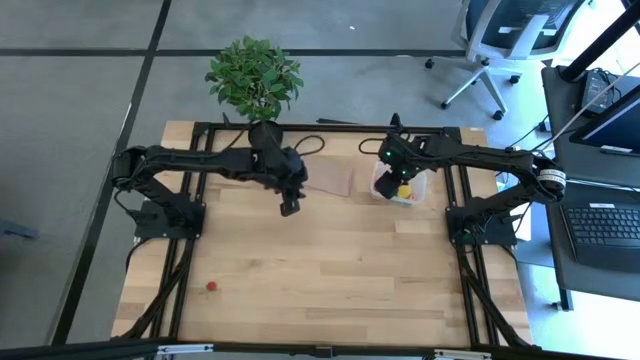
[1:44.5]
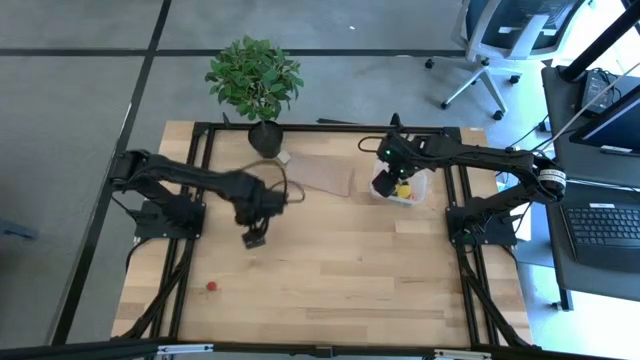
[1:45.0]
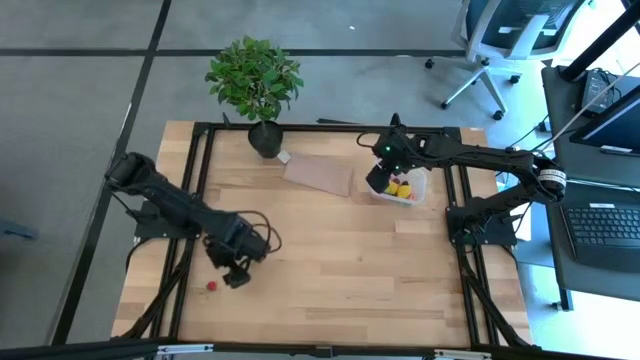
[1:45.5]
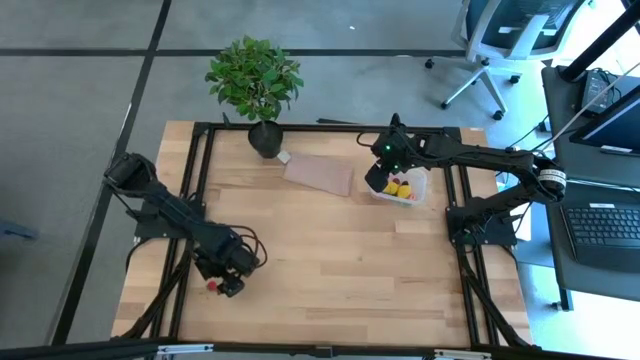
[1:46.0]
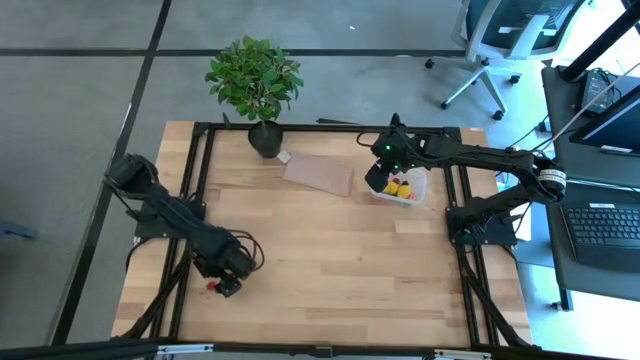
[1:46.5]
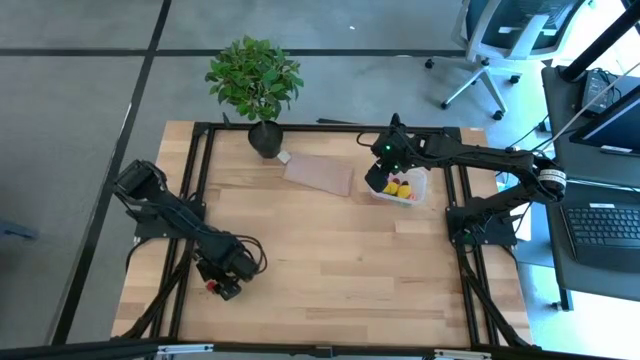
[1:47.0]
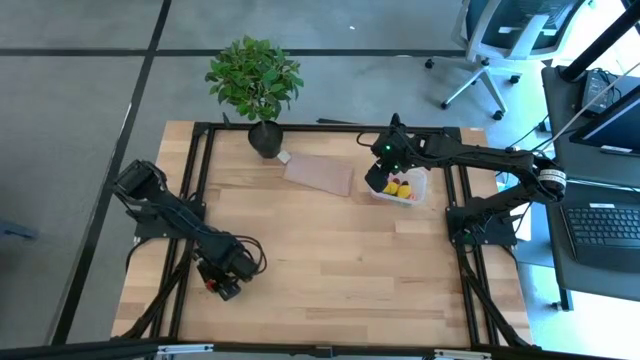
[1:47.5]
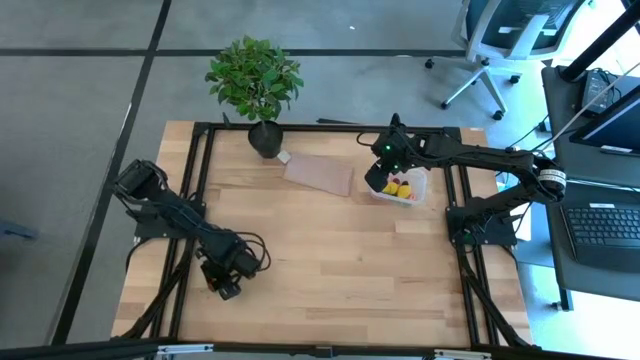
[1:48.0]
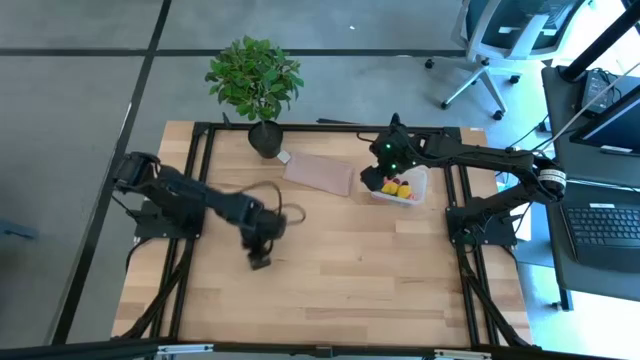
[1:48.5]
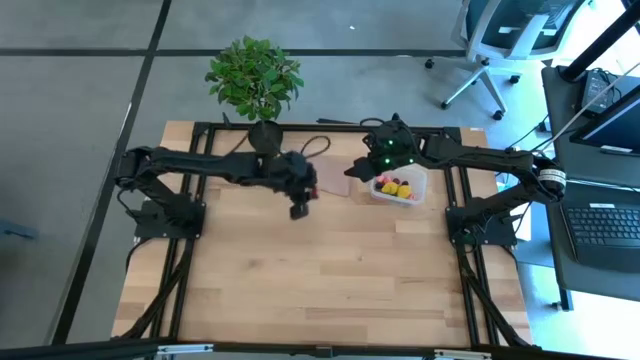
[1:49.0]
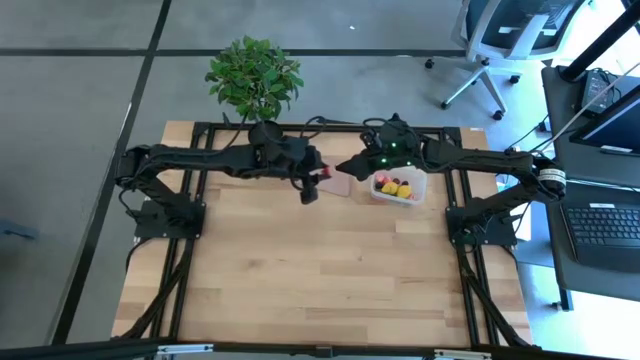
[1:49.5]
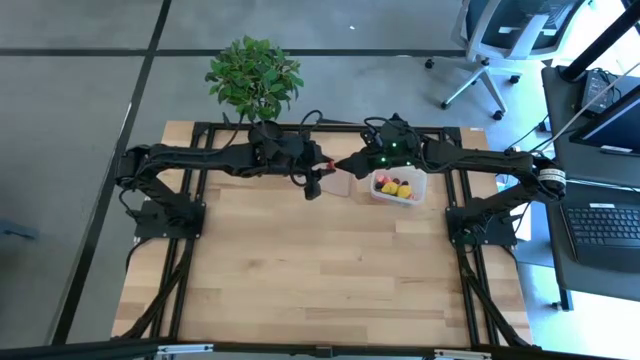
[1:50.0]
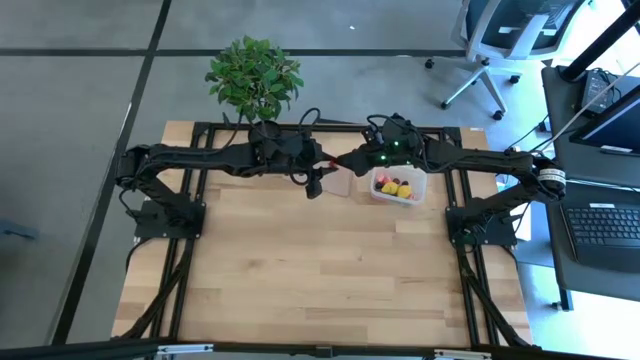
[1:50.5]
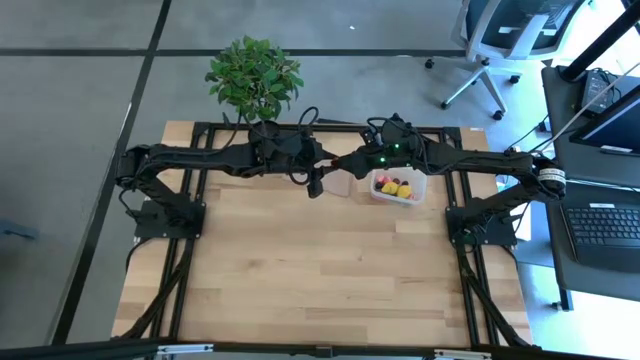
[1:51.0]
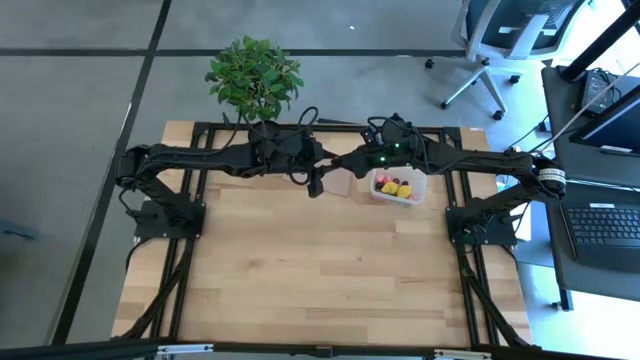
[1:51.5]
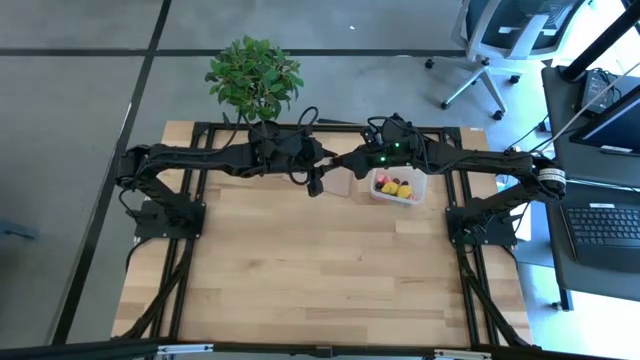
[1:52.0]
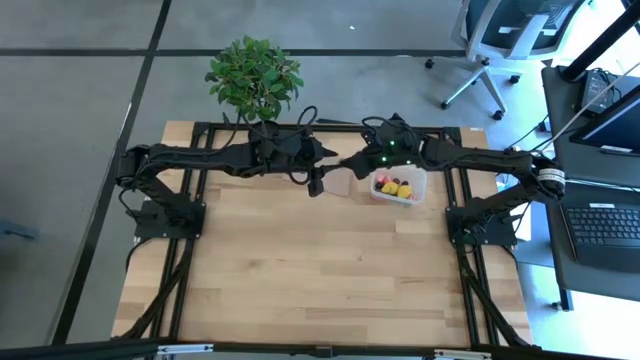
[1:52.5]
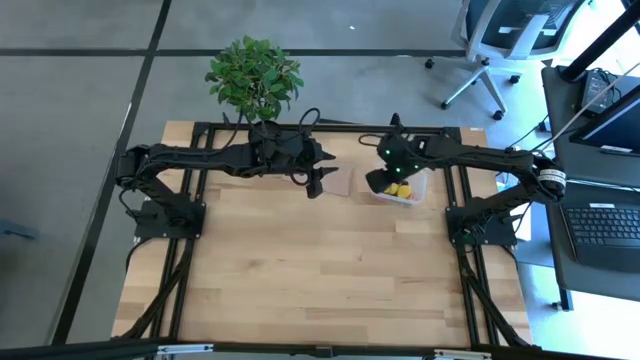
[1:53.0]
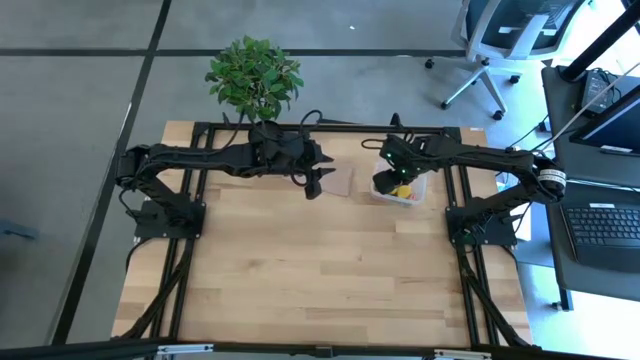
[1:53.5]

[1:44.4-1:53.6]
Task: Pick and placing Produce into tupperware
Put the red strawberry into the transparent container

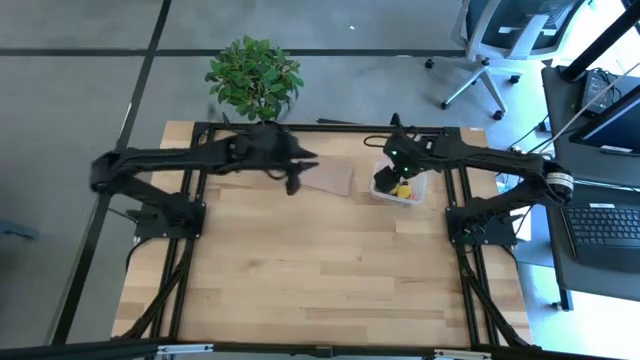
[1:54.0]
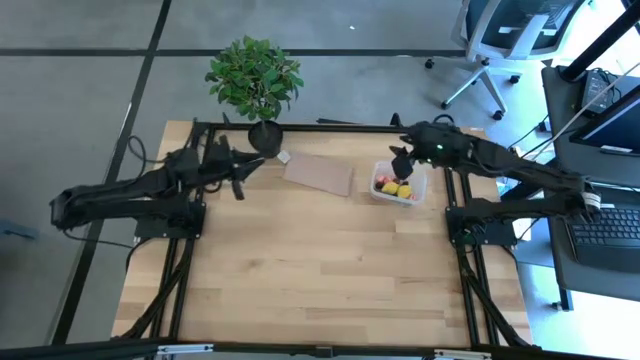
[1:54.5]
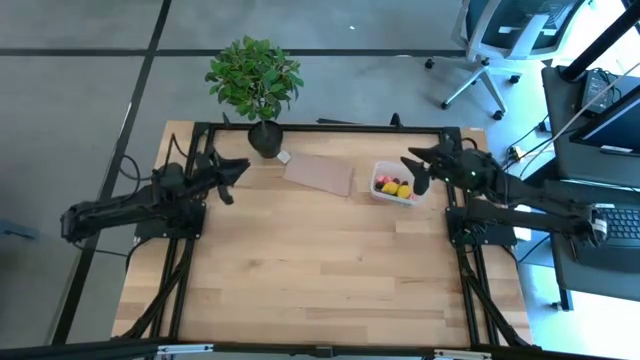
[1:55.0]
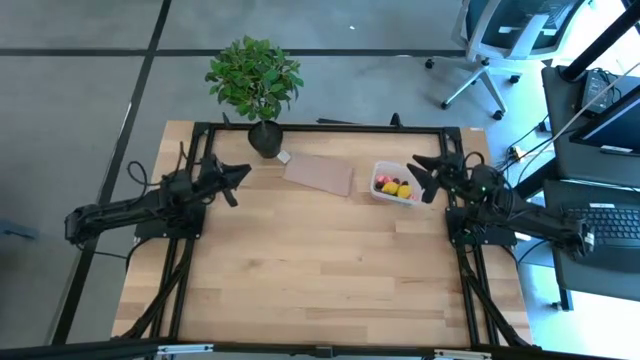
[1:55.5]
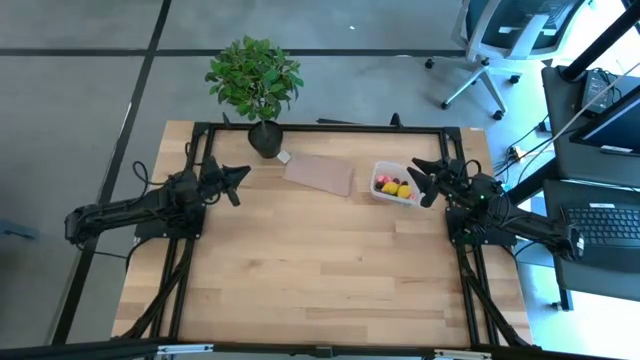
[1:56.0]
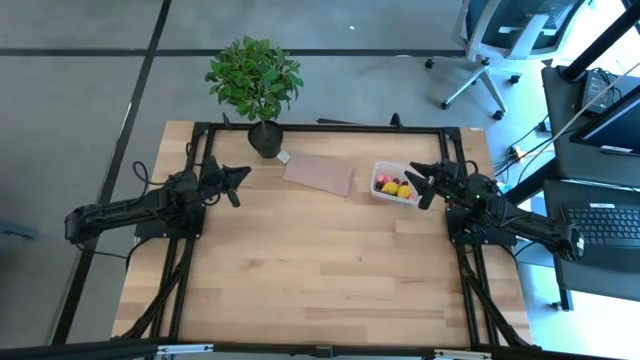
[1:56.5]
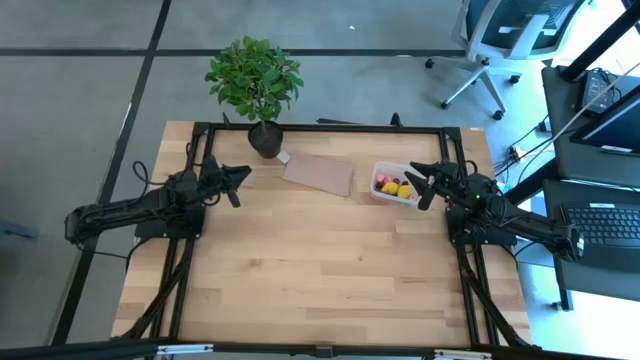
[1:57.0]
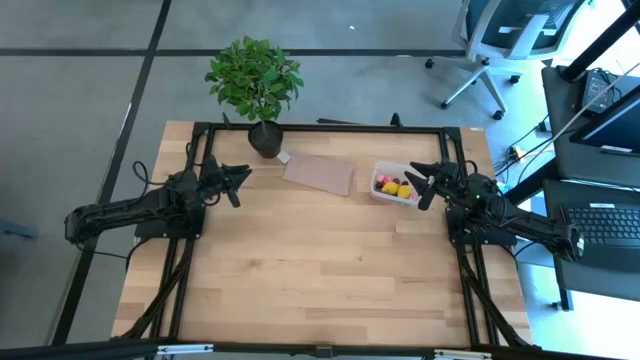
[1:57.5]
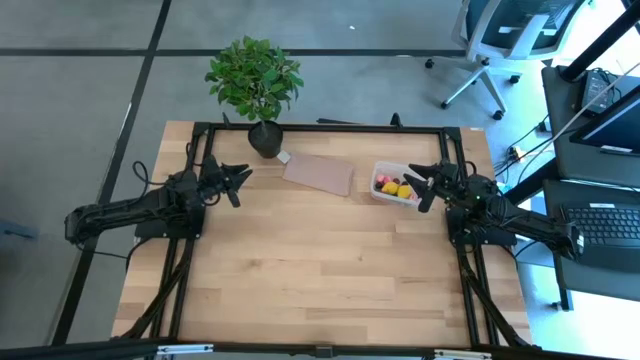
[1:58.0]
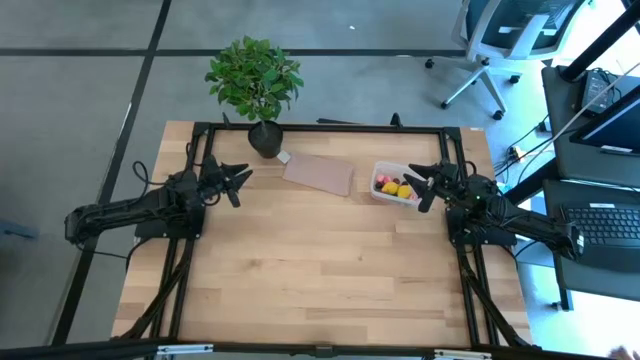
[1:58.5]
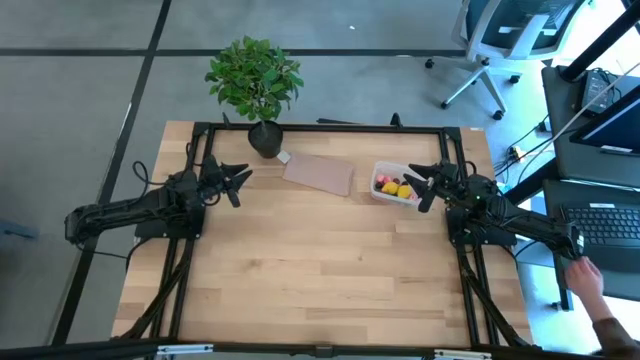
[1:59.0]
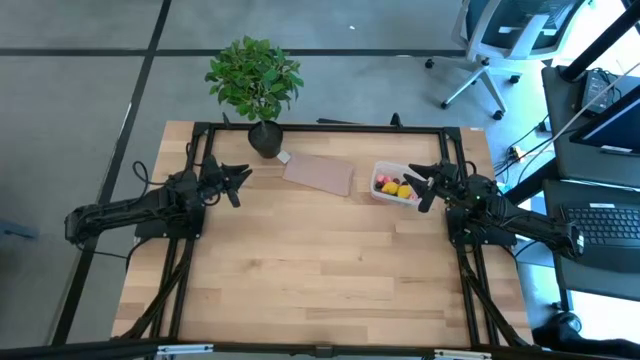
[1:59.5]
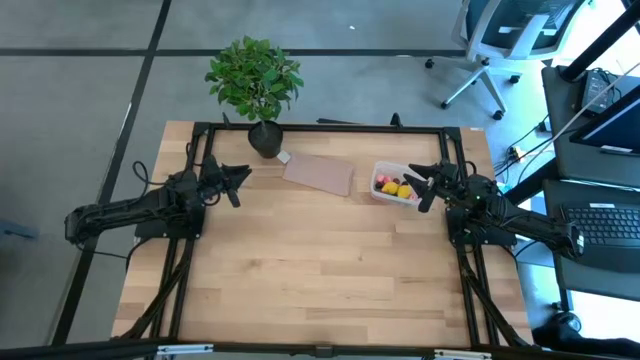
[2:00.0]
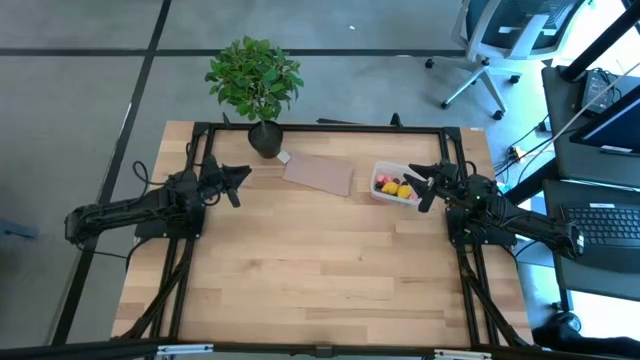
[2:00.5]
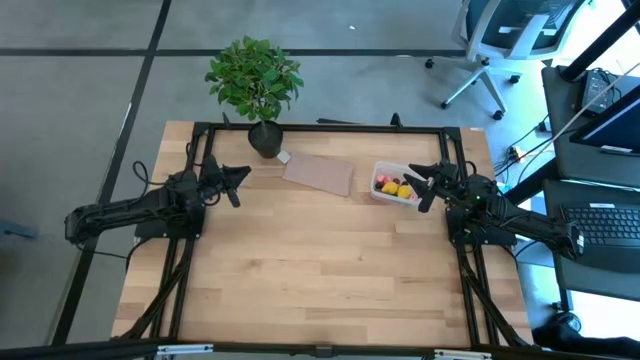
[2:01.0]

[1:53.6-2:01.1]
Return to Home Position

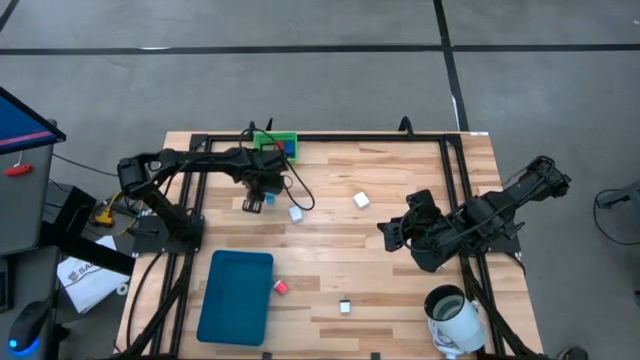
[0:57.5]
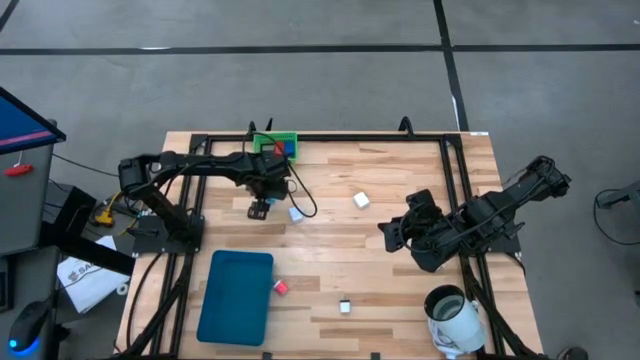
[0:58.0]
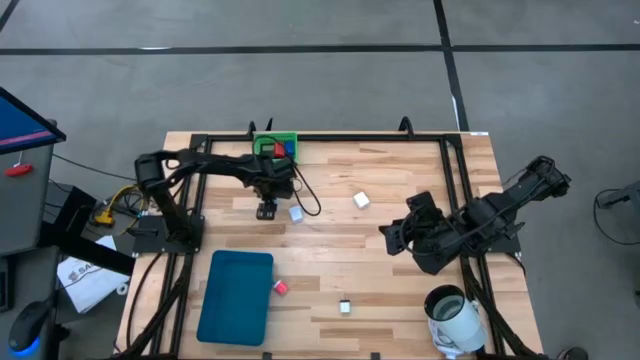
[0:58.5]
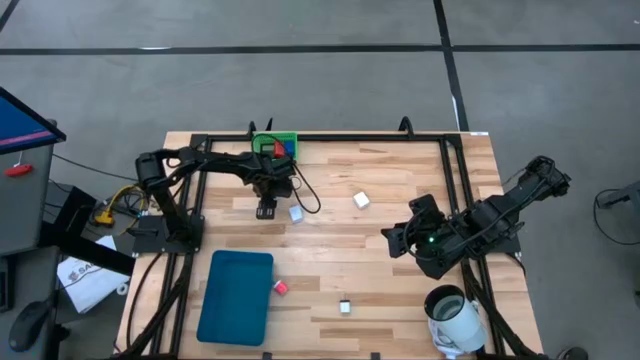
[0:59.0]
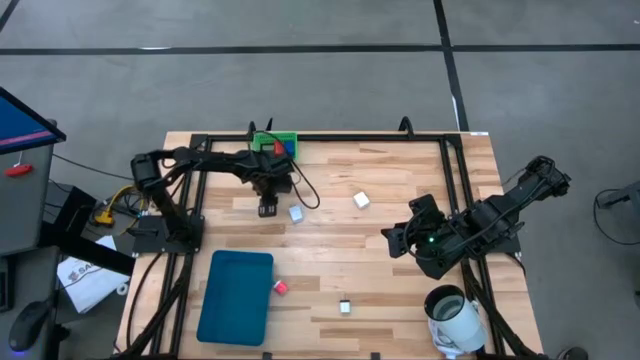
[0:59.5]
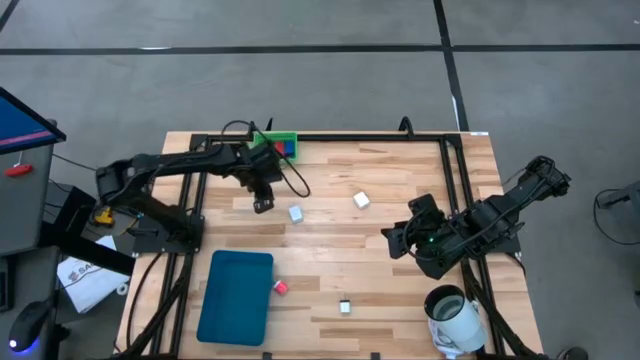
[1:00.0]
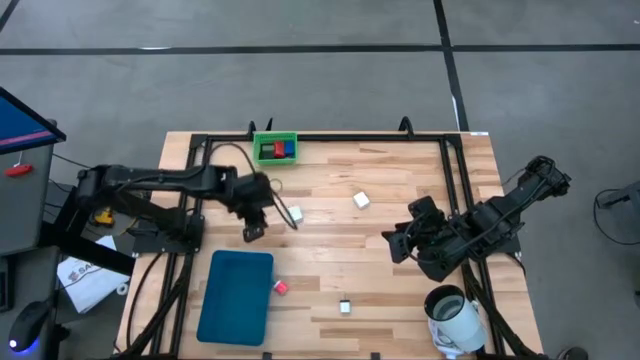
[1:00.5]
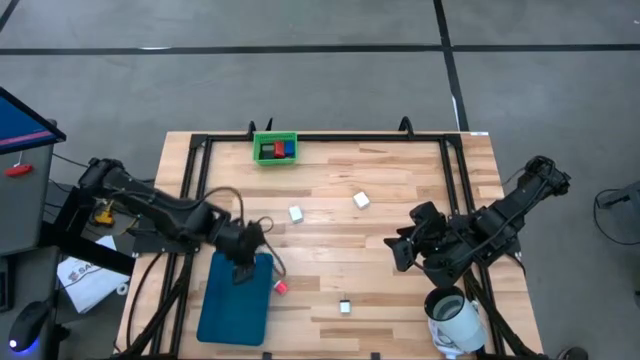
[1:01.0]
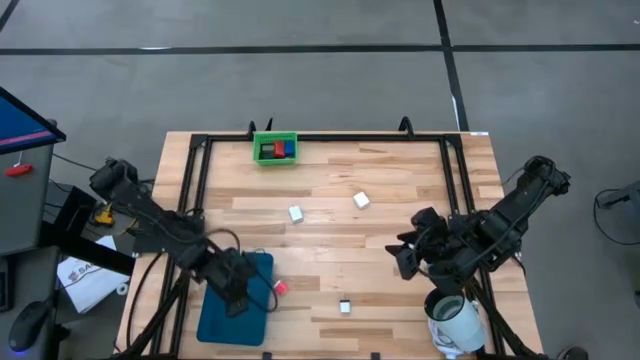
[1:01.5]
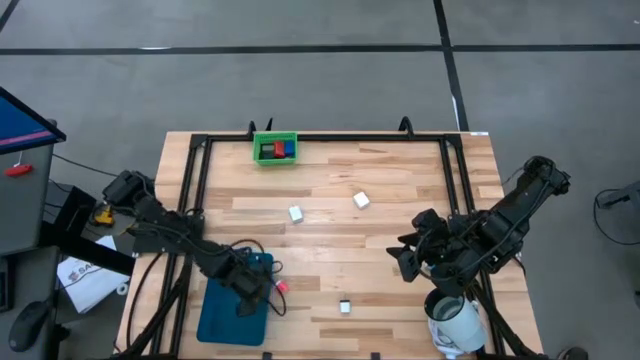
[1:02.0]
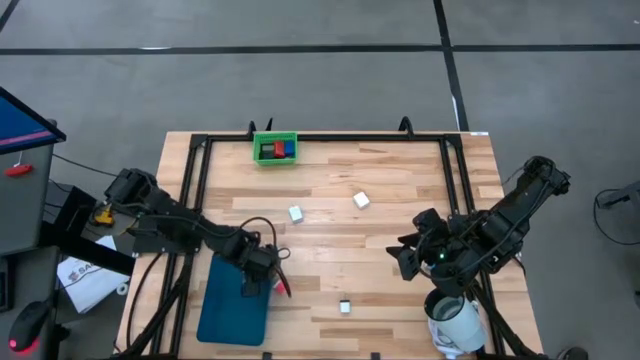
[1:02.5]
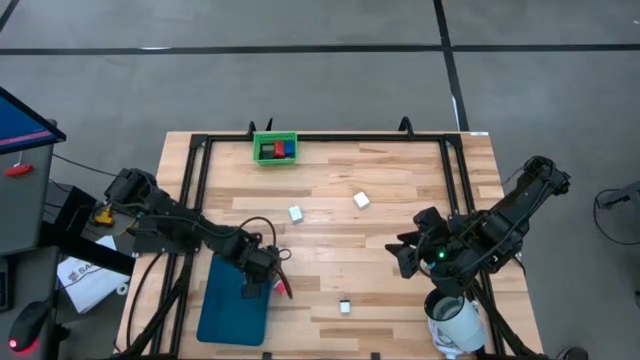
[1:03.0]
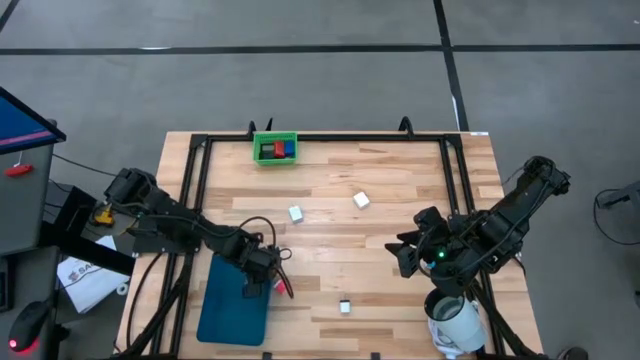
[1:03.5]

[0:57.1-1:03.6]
Task: Pick & Place Office items
Put the left light blue charger adapter into the blue bin
